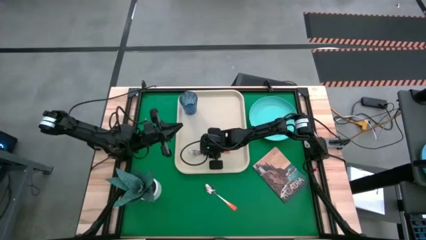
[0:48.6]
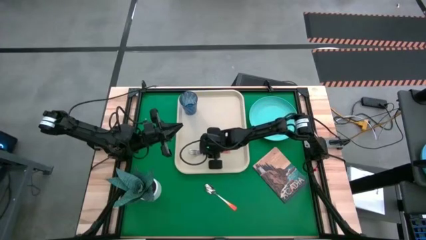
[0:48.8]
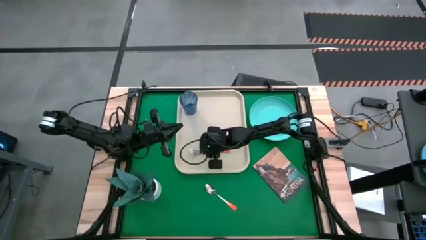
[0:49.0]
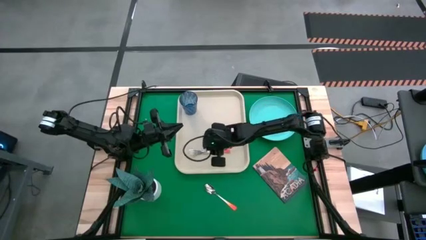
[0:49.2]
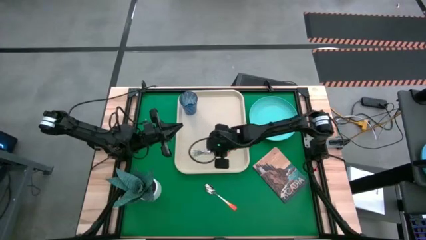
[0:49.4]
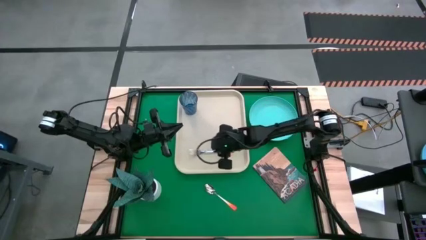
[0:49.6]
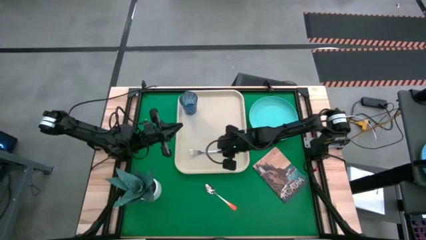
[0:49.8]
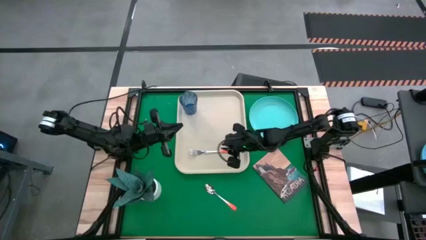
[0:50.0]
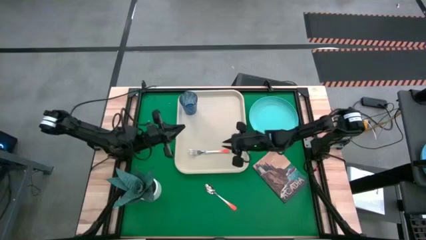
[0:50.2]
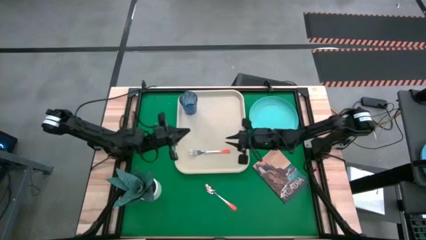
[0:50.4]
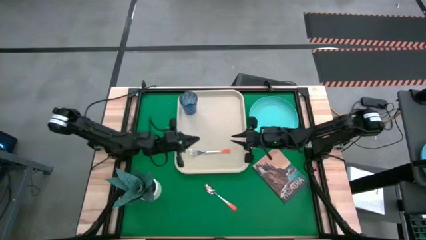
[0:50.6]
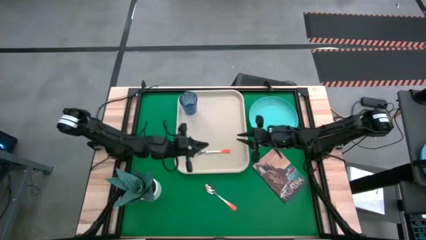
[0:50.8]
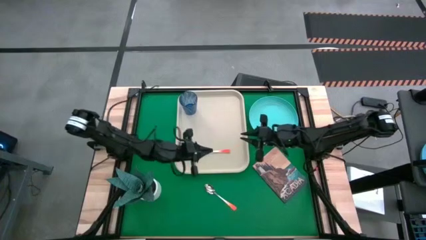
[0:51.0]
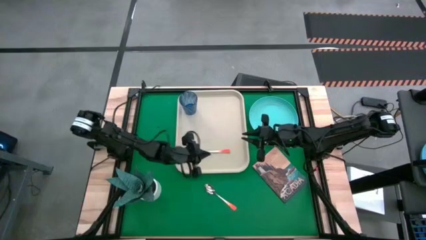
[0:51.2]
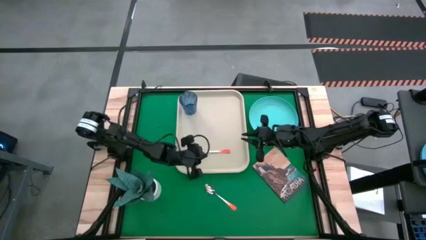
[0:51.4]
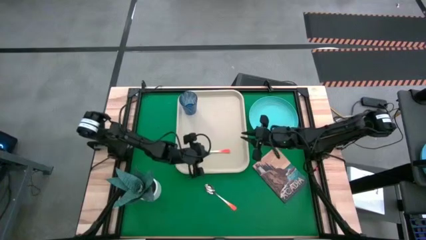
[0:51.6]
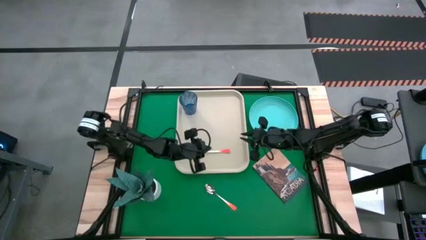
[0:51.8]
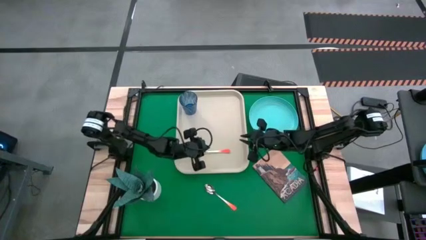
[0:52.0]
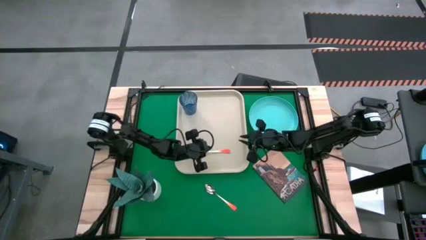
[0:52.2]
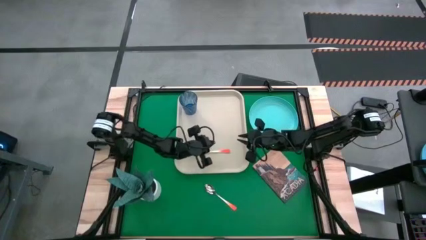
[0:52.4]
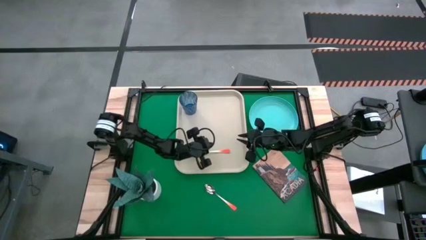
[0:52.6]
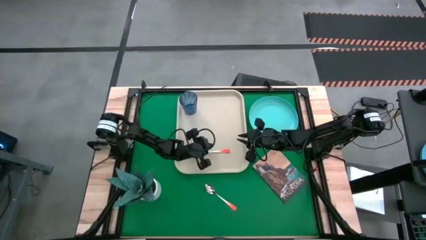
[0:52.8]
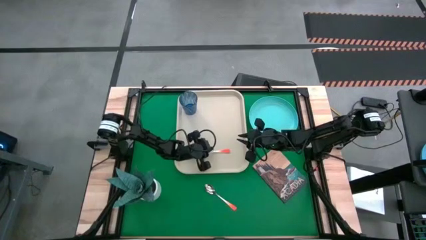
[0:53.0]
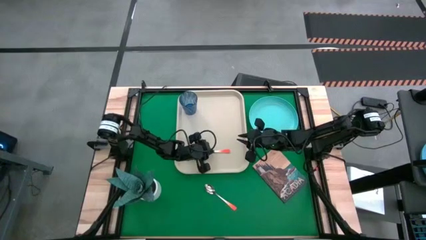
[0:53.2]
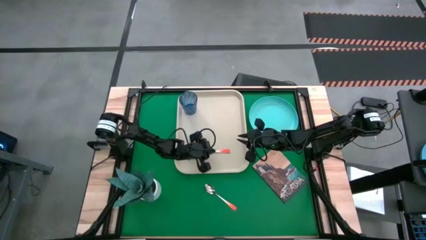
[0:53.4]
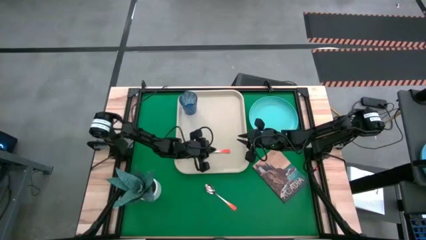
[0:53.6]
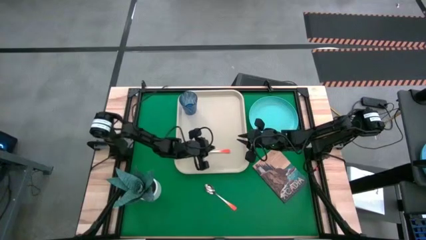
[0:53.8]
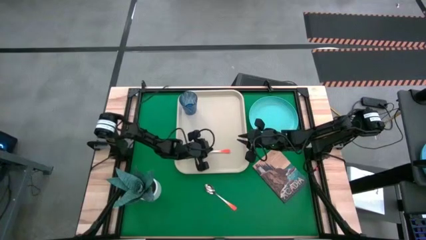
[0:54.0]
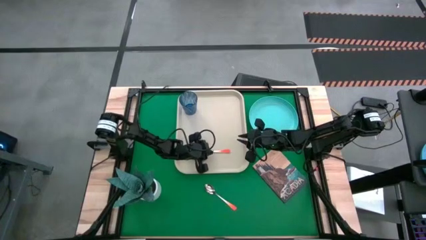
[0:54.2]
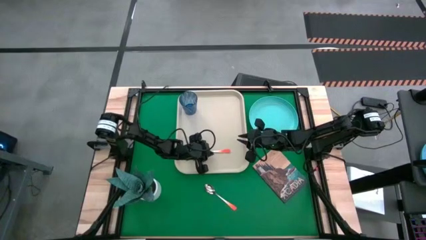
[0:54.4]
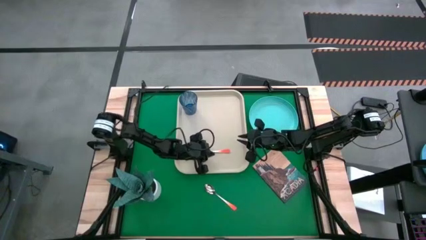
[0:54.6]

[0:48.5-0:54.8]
Task: Pick and place plate/cup/fork/spoon on tray
Put the orange fork on the left of the white serving tray

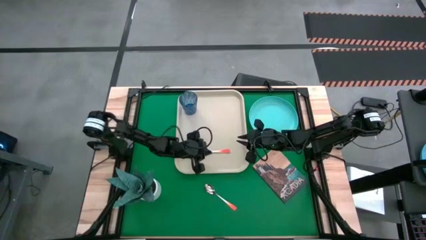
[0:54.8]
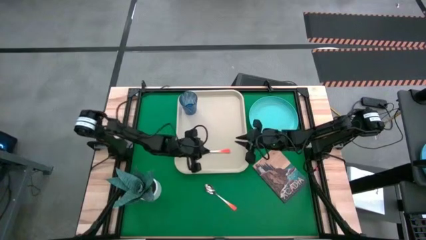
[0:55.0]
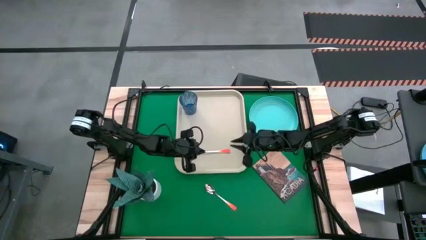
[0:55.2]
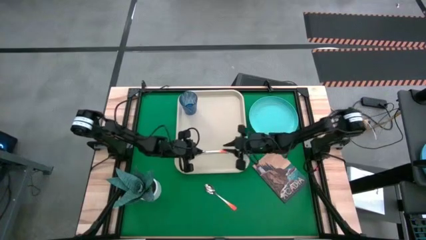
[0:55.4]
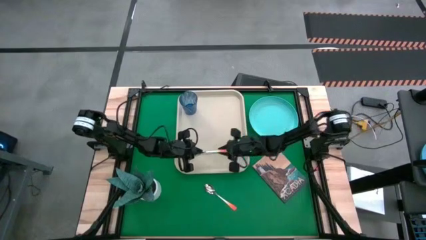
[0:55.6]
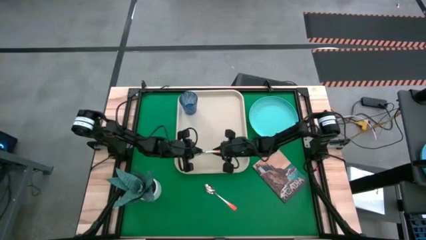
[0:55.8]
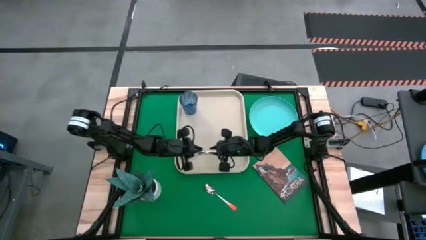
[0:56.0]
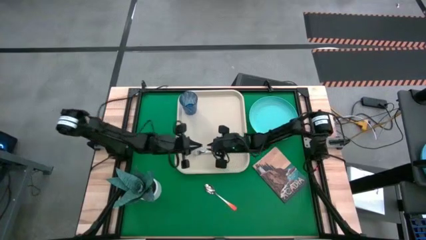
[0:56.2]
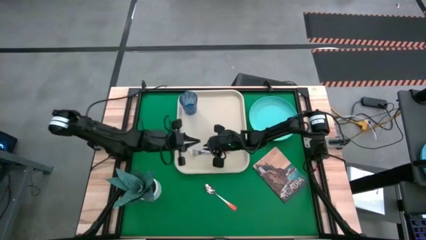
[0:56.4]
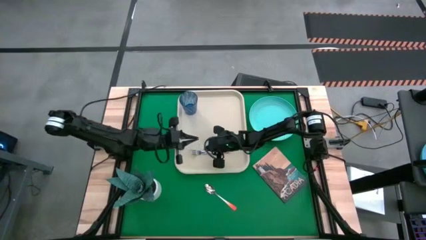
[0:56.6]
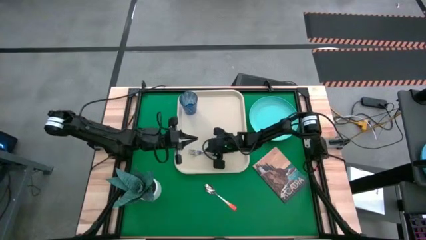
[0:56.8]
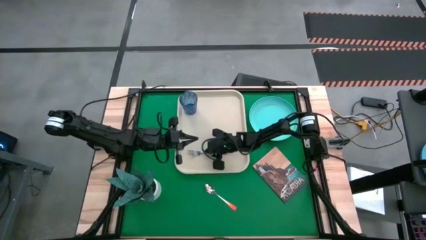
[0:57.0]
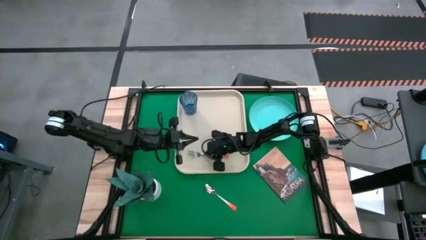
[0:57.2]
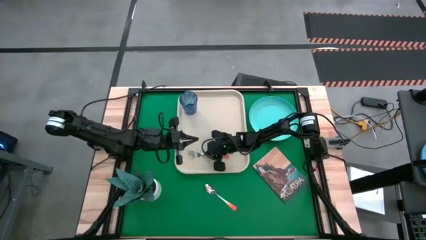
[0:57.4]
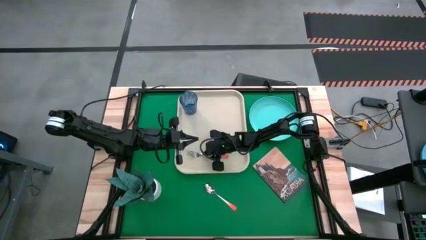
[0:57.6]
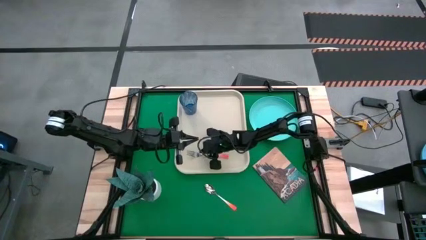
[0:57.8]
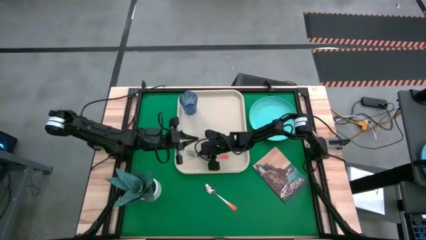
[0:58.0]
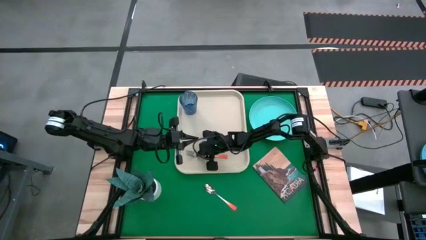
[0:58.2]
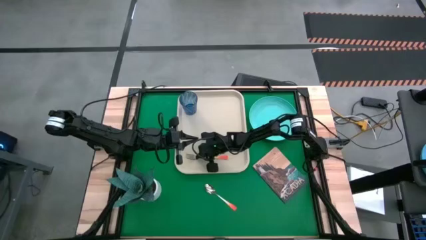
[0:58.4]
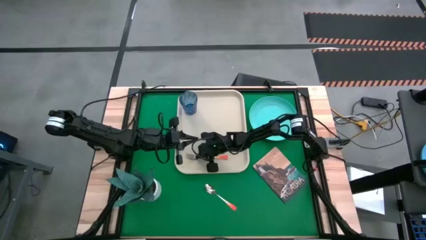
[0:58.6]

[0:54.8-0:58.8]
Put the orange fork on the left of the white serving tray
